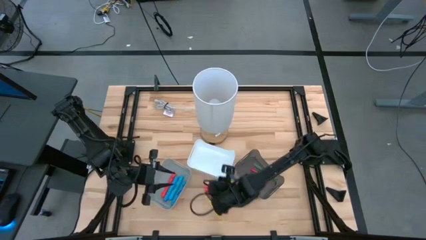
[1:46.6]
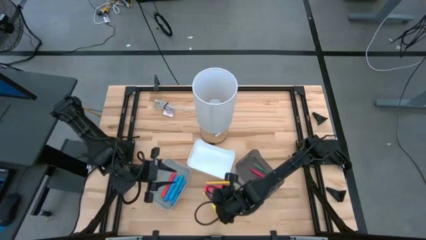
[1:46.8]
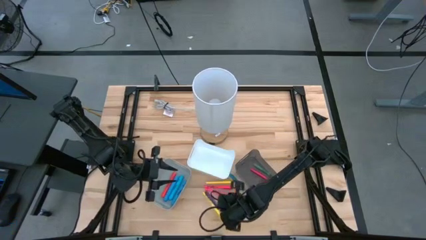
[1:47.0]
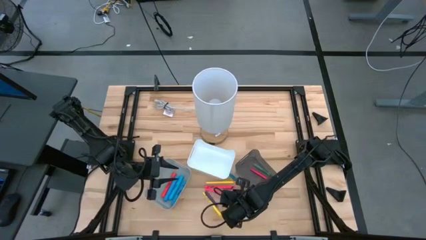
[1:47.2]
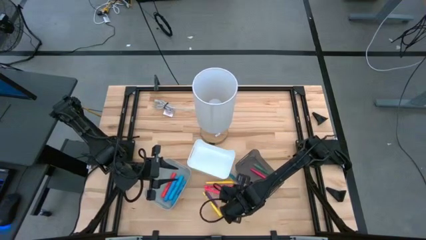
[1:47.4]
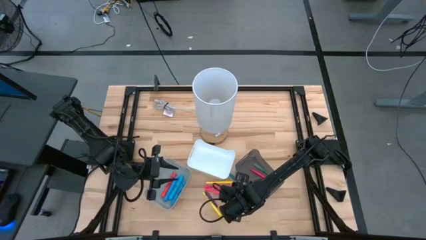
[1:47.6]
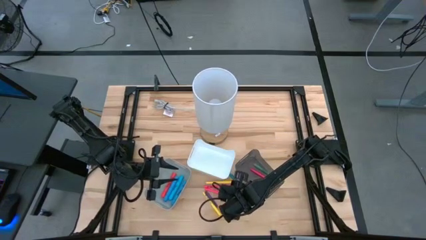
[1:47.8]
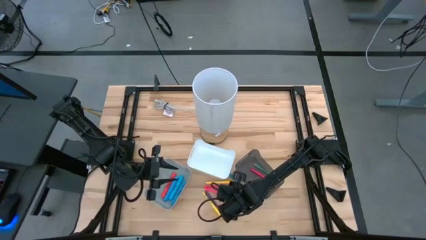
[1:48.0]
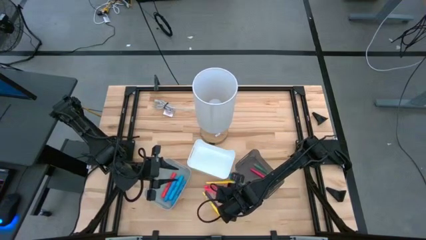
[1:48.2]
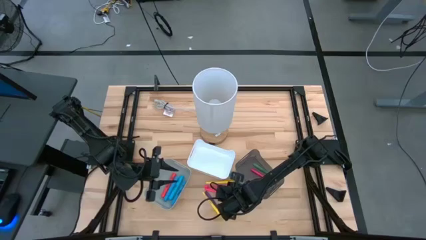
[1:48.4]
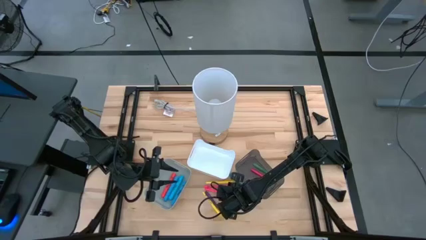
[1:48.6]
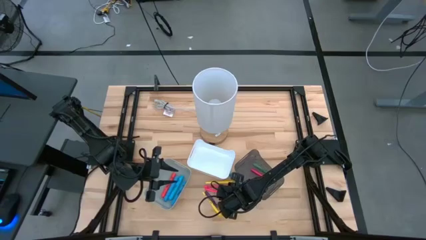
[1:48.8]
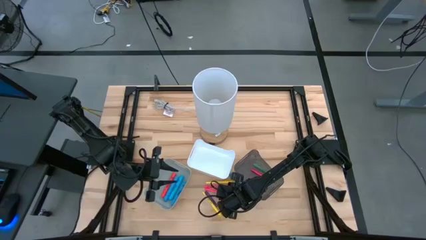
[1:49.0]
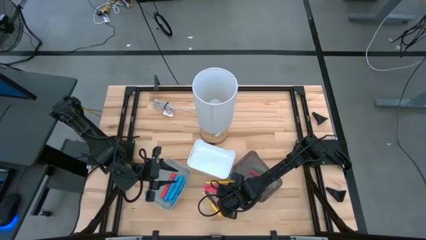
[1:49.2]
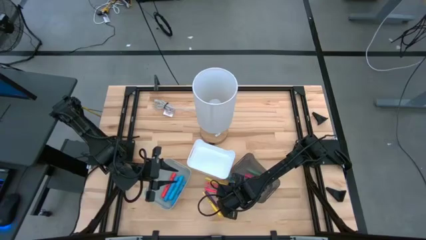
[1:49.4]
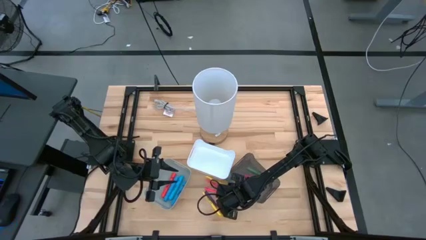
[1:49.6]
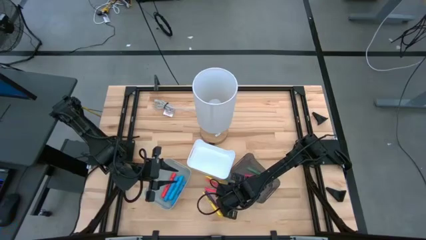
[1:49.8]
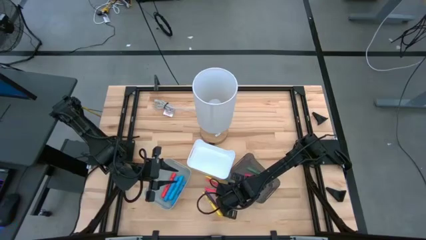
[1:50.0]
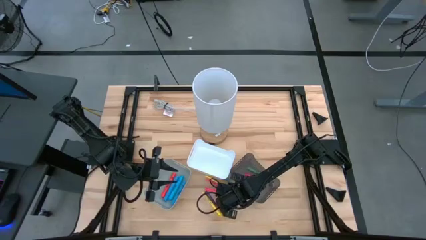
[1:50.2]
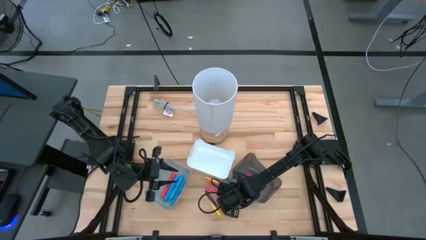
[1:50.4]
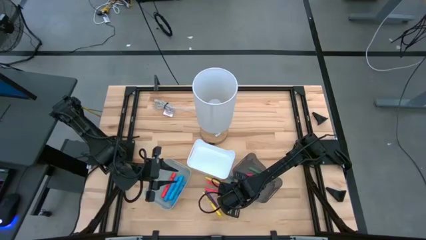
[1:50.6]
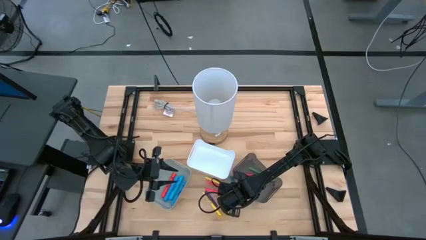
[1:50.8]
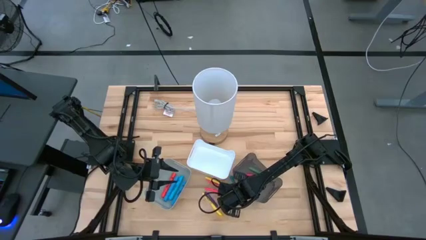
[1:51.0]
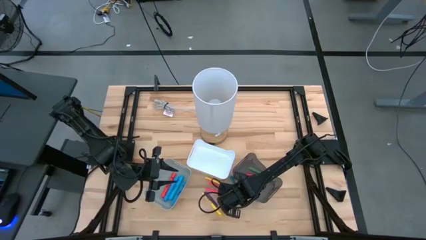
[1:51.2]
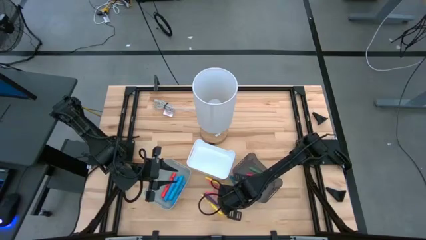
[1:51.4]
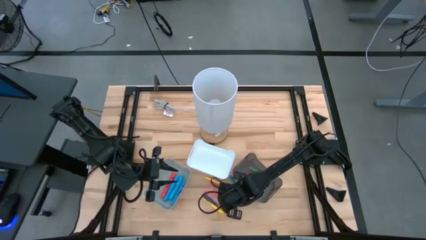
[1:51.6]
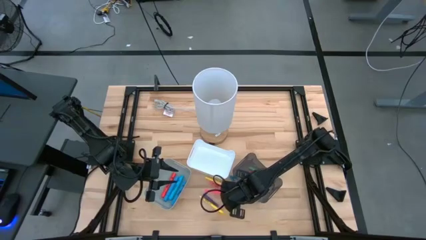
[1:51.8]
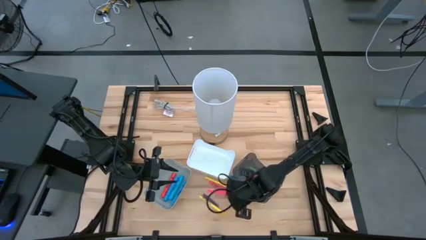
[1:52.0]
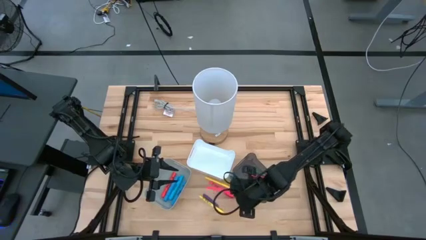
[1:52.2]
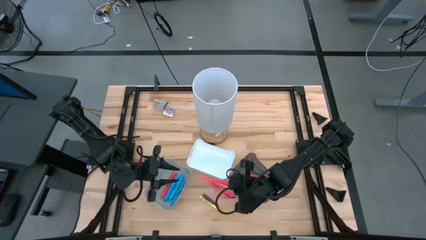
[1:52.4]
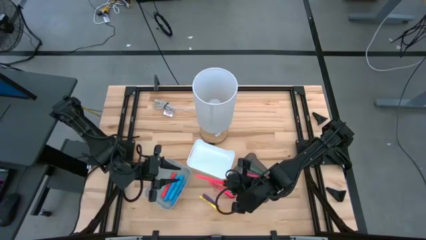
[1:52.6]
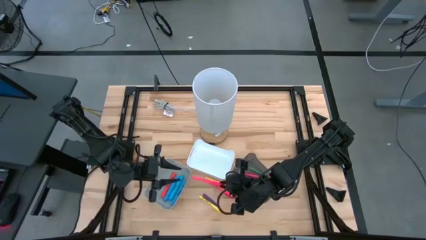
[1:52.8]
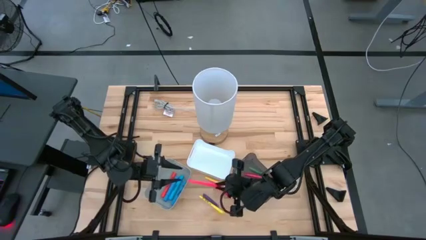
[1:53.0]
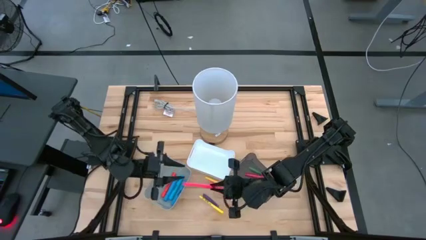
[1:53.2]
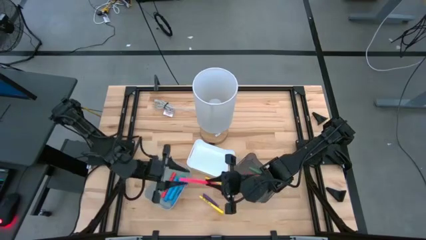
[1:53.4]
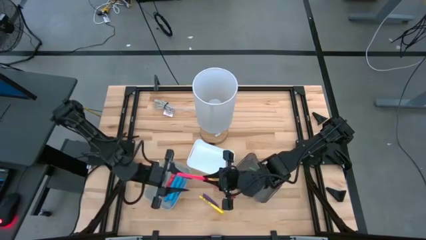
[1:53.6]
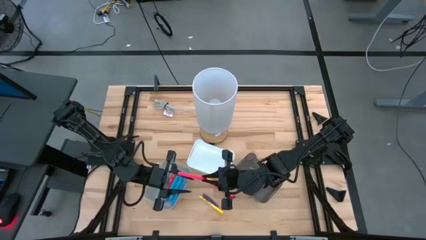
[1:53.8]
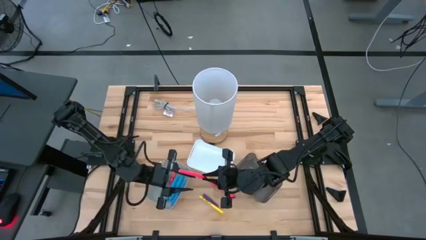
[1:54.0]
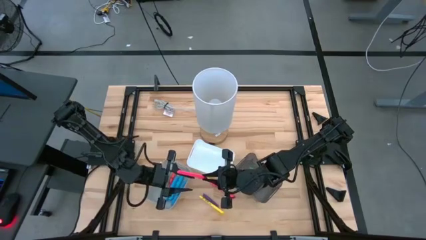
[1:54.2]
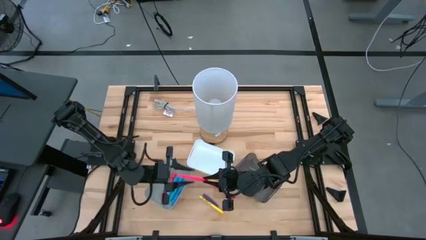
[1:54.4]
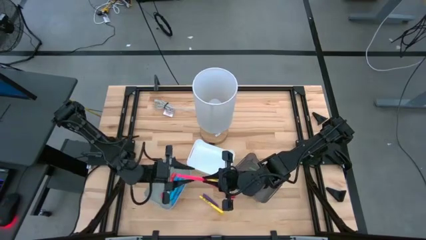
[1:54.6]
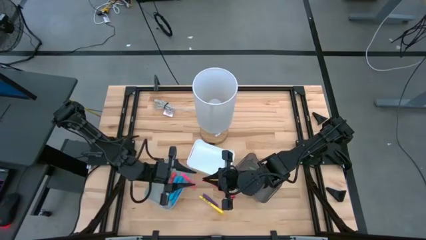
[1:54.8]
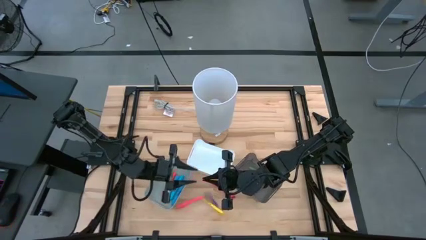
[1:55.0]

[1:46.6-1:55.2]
Task: Pick & Place Markers
Put the bottom pink marker pen in the white bin

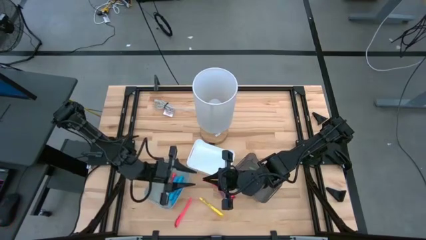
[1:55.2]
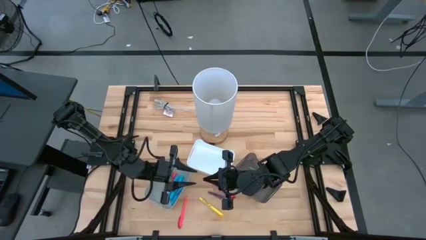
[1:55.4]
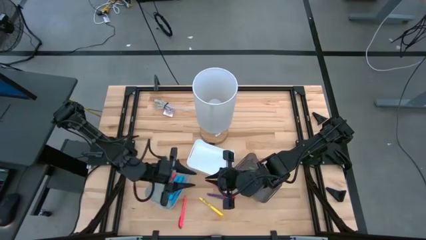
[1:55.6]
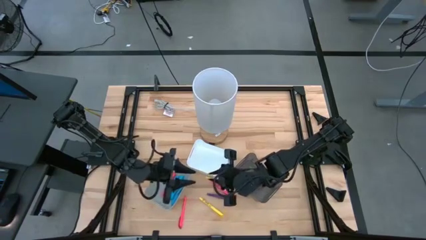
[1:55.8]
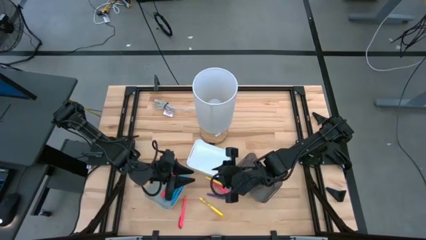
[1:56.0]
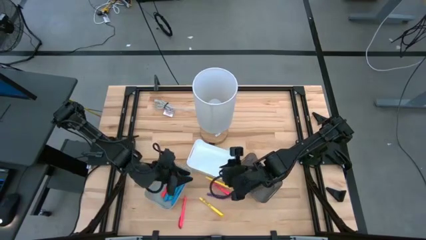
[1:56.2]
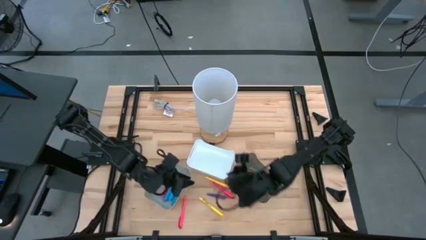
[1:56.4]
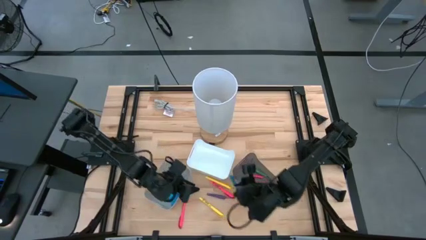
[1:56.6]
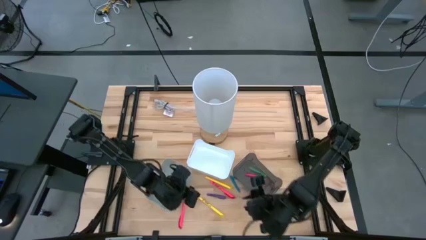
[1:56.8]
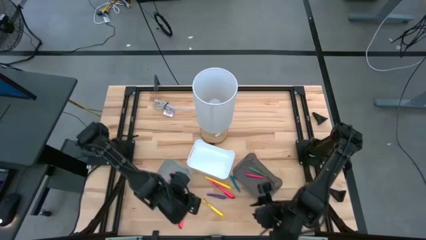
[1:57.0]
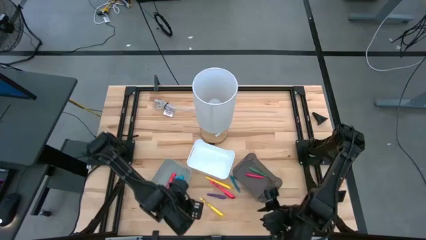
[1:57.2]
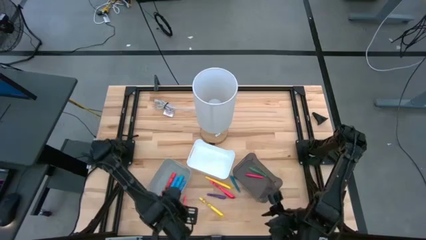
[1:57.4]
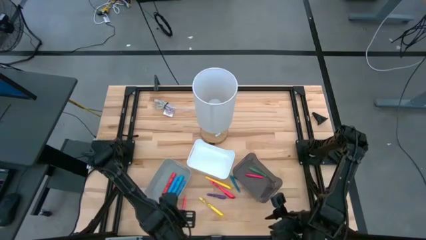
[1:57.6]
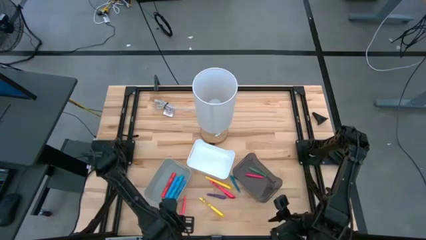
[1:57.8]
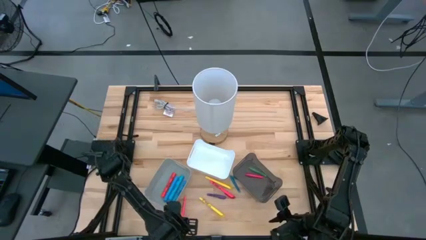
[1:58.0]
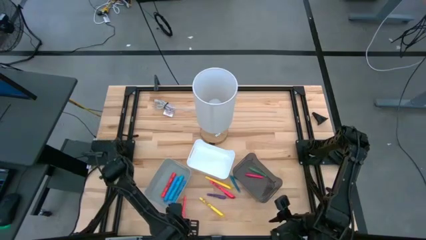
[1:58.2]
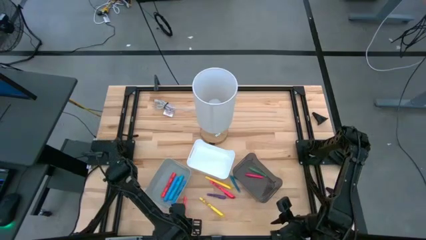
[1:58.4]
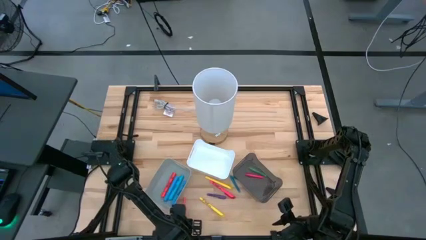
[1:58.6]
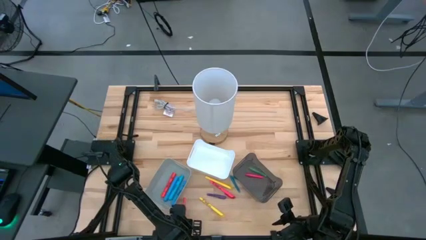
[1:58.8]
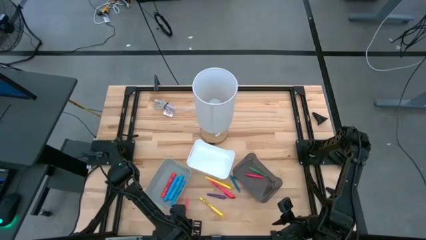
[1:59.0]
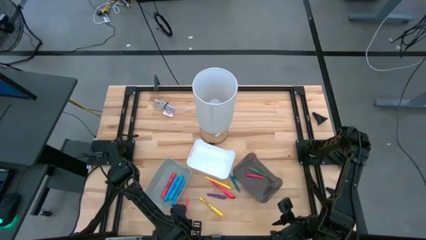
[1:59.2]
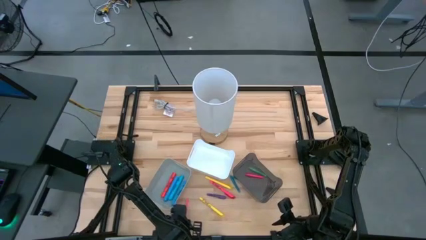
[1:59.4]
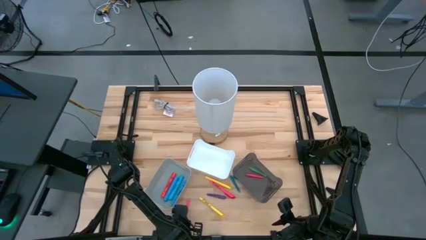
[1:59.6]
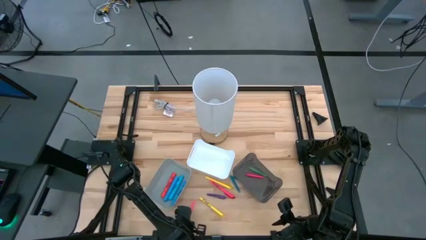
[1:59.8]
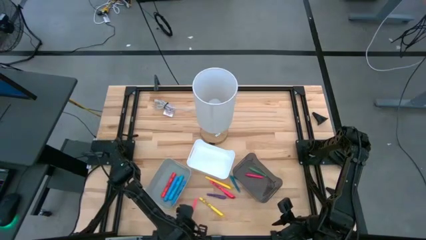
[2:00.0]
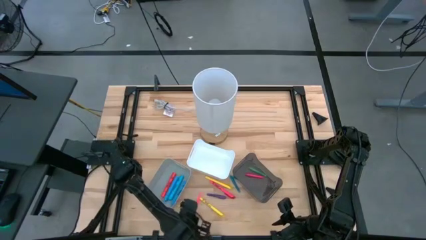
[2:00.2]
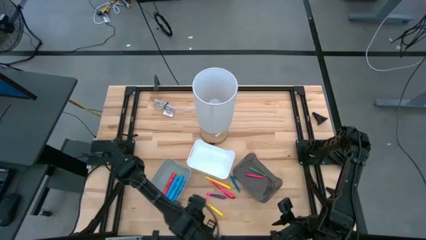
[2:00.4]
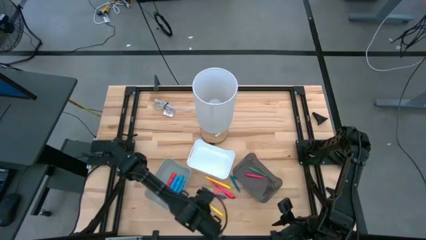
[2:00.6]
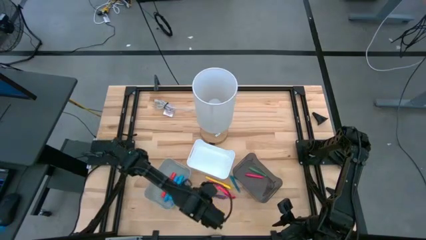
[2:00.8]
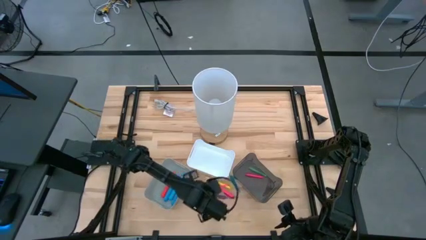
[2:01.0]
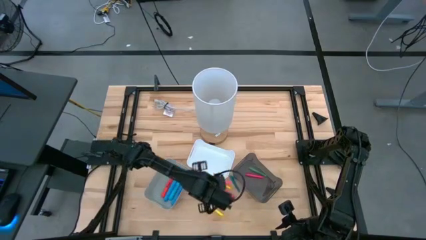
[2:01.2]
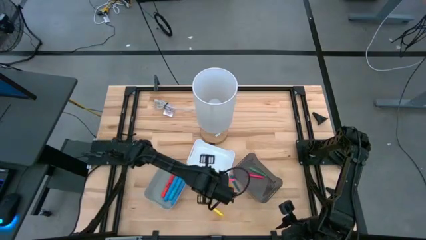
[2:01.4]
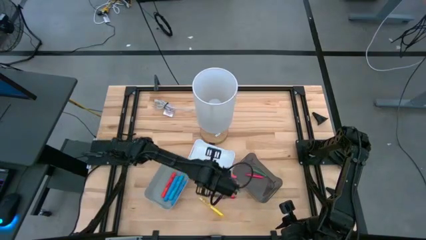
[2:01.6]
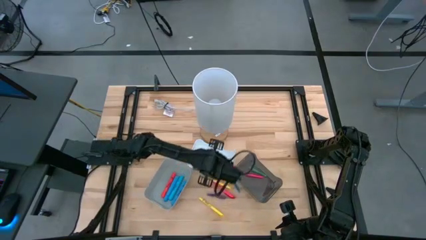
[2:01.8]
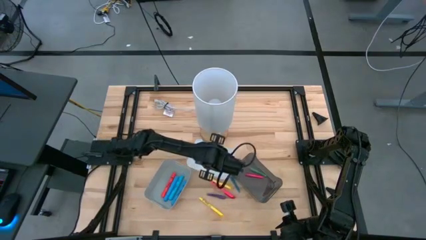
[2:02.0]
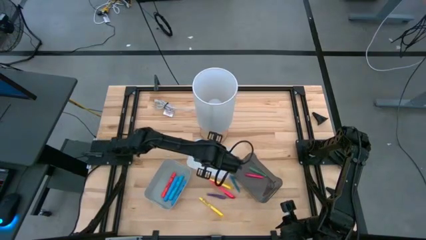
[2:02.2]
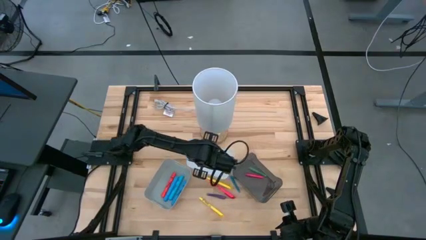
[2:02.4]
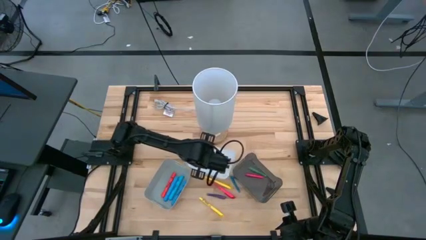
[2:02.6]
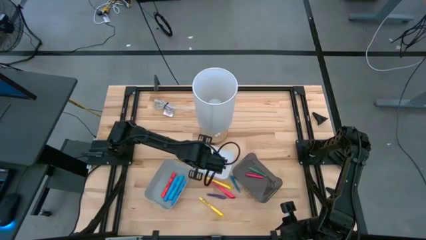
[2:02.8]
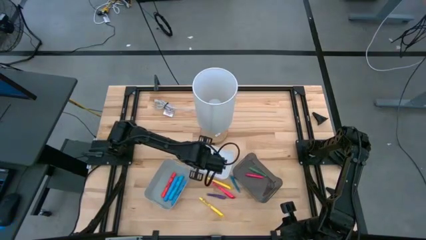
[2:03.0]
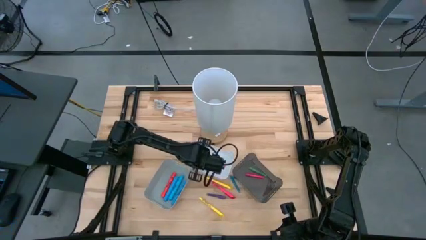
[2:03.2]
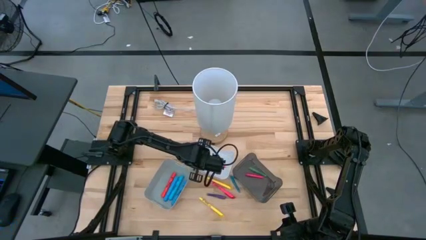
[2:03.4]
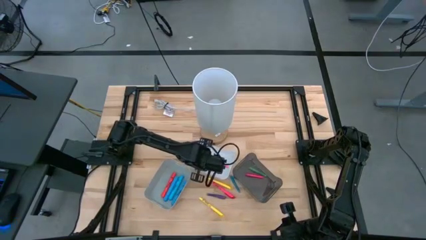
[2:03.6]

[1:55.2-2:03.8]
Put the left pink marker pen in the white bin
